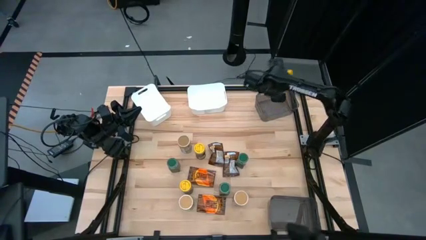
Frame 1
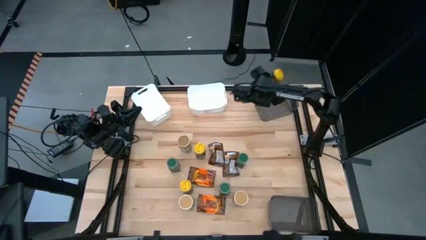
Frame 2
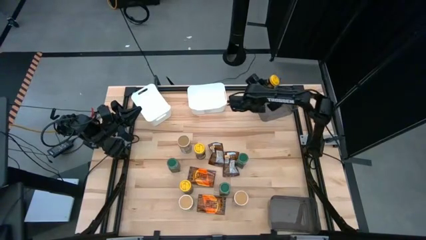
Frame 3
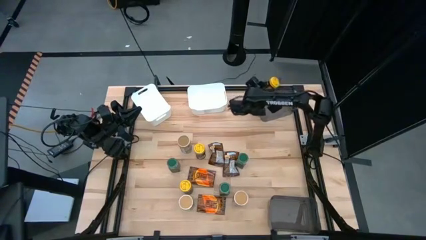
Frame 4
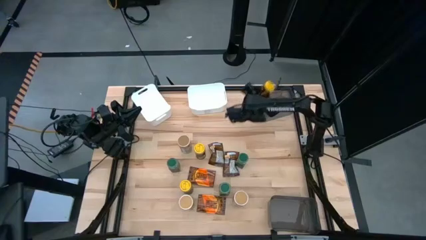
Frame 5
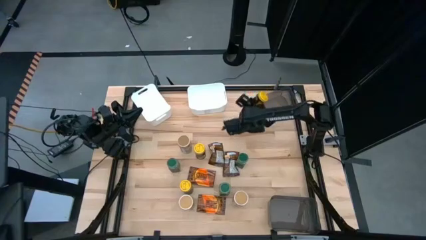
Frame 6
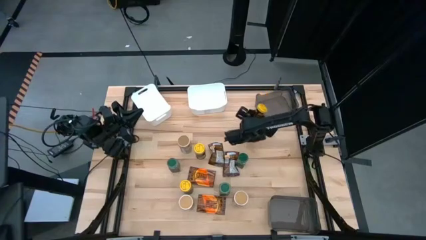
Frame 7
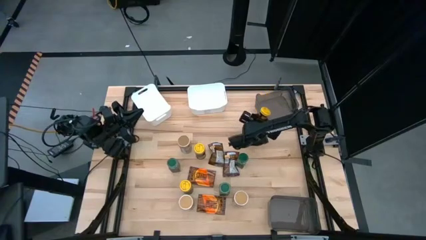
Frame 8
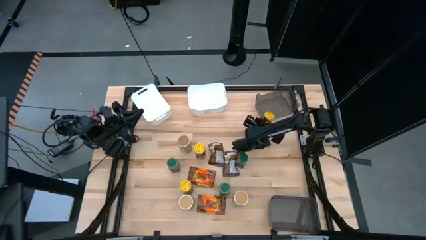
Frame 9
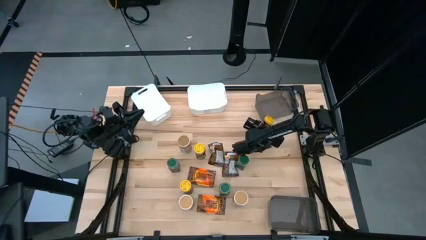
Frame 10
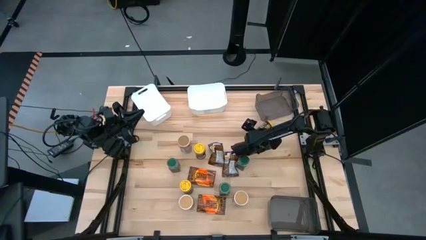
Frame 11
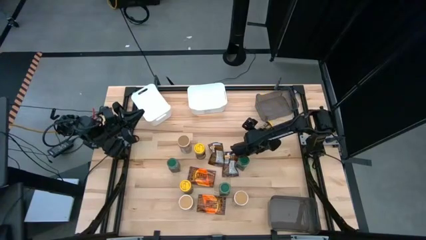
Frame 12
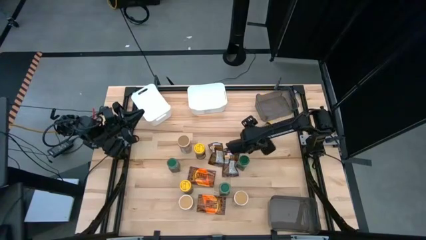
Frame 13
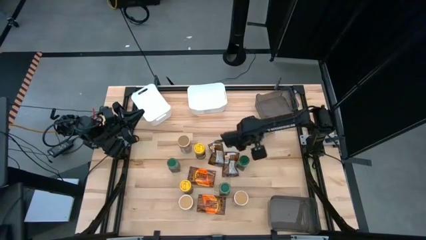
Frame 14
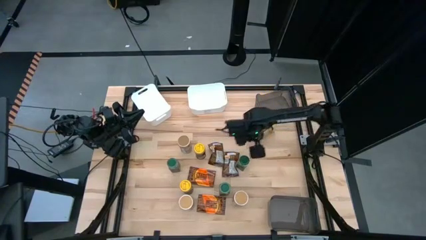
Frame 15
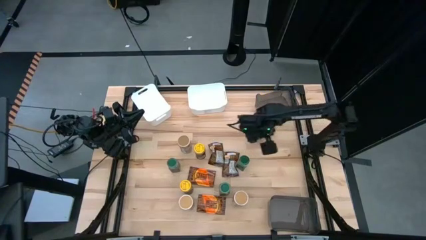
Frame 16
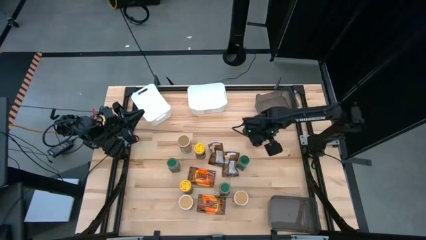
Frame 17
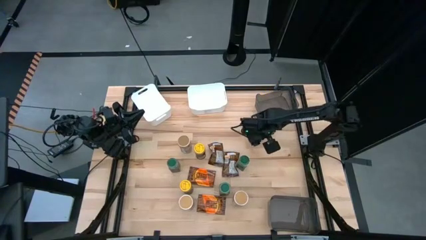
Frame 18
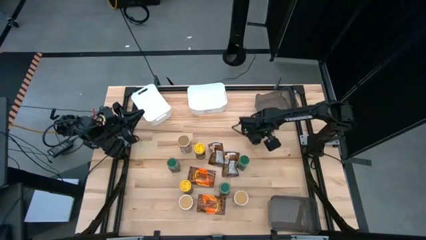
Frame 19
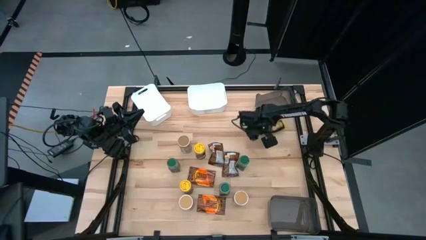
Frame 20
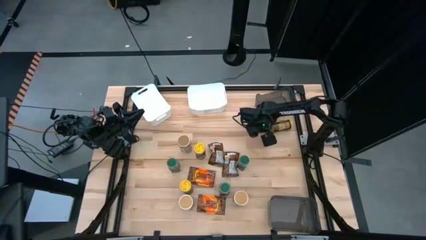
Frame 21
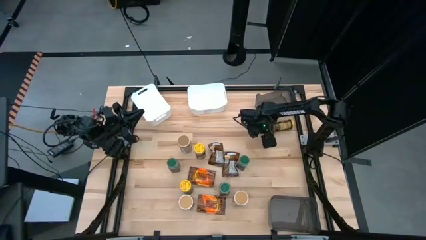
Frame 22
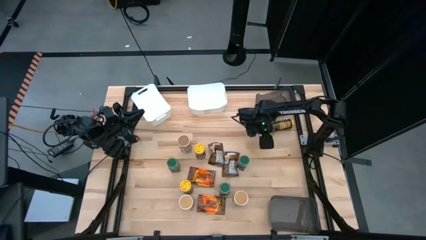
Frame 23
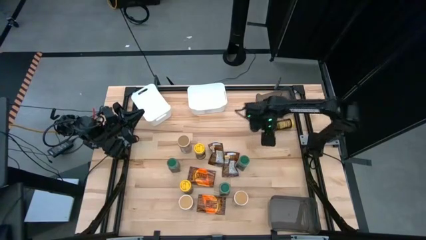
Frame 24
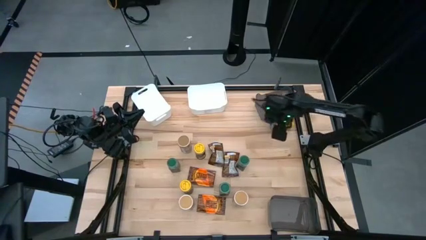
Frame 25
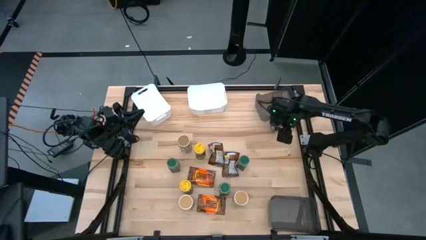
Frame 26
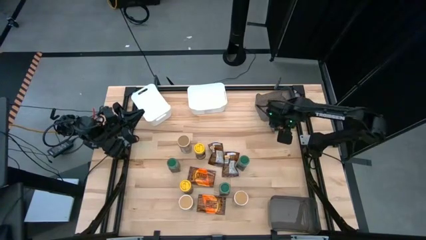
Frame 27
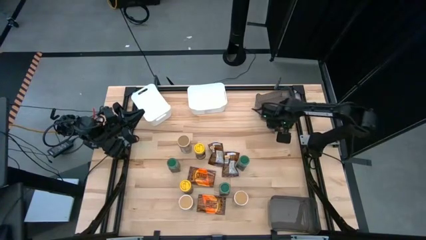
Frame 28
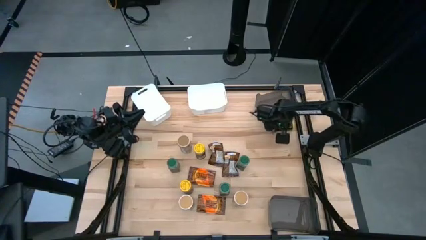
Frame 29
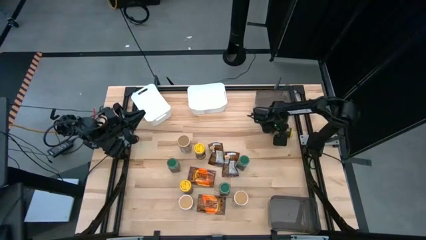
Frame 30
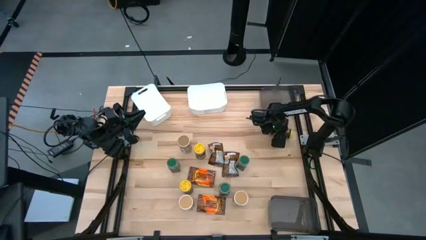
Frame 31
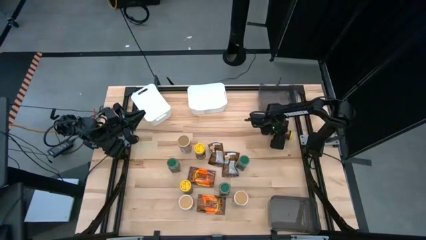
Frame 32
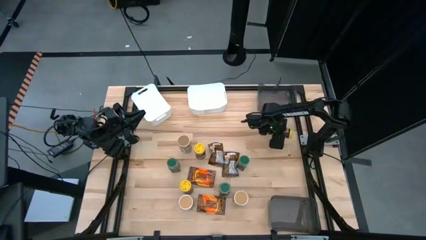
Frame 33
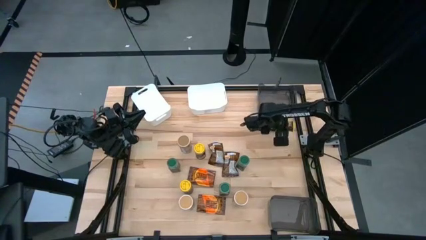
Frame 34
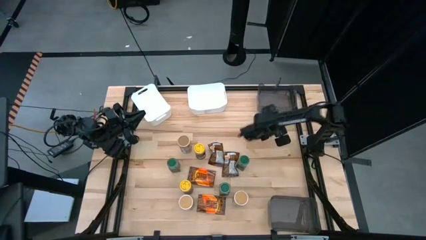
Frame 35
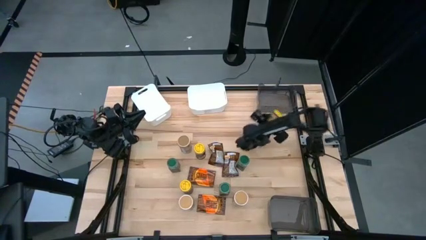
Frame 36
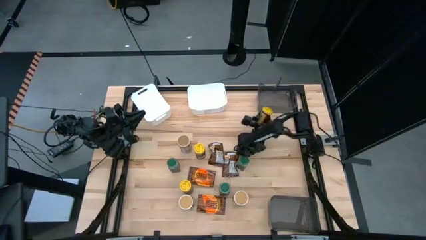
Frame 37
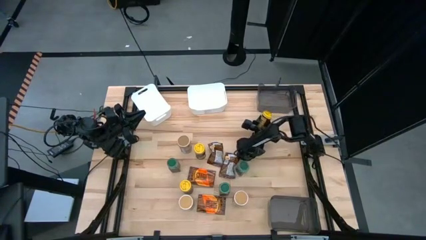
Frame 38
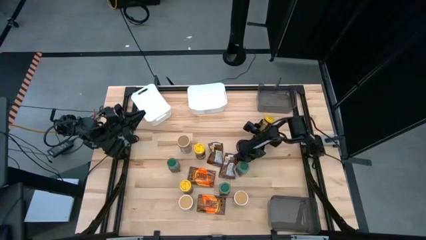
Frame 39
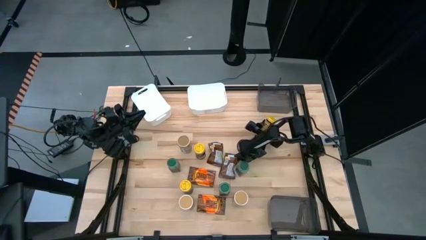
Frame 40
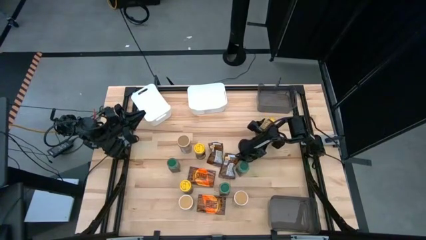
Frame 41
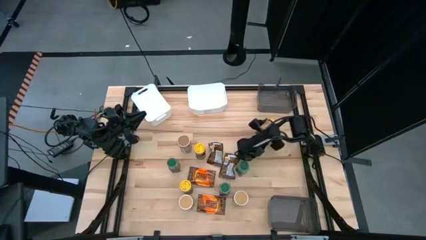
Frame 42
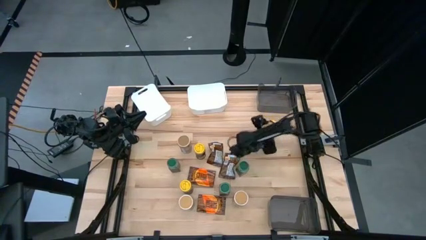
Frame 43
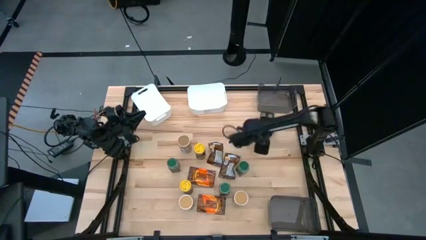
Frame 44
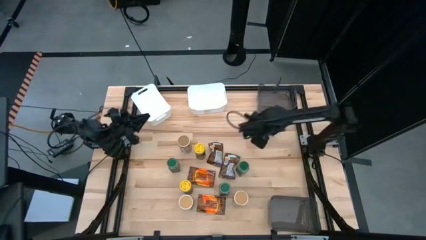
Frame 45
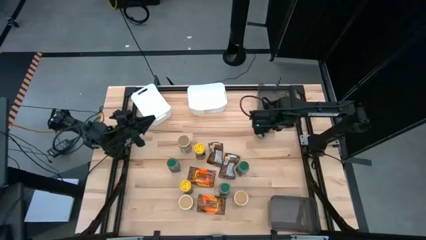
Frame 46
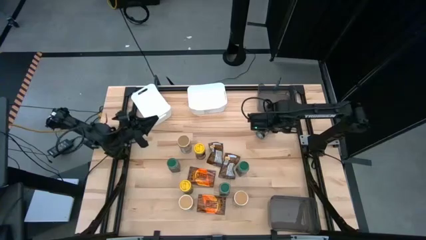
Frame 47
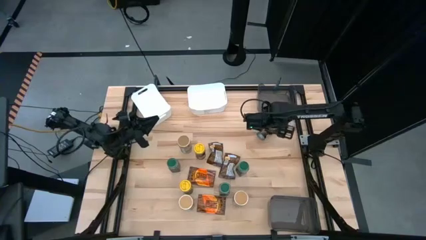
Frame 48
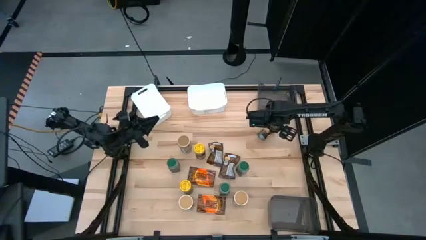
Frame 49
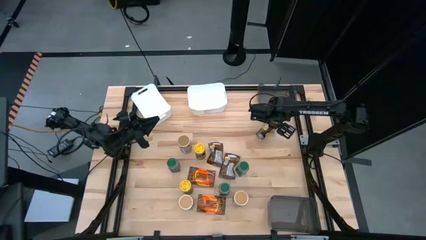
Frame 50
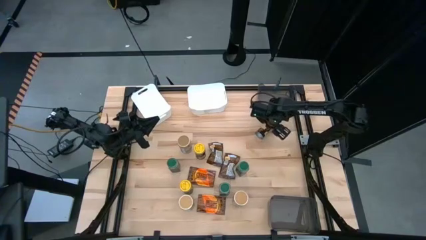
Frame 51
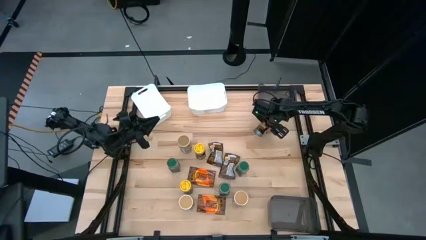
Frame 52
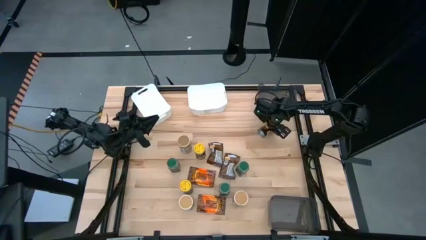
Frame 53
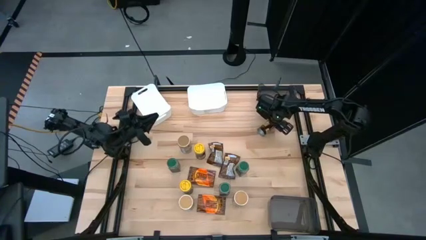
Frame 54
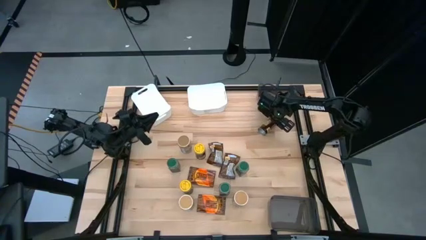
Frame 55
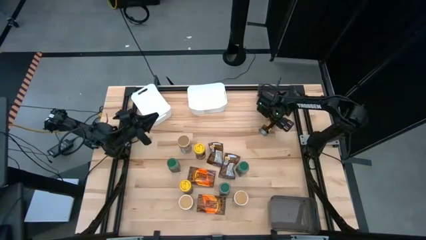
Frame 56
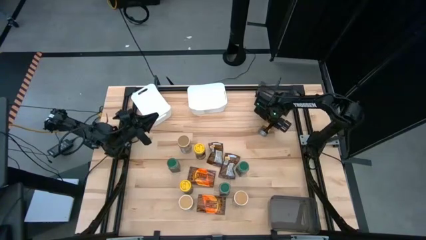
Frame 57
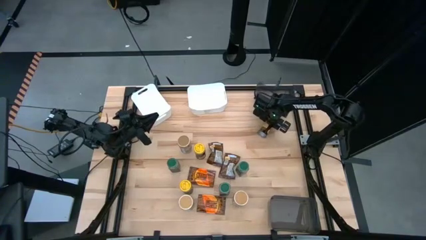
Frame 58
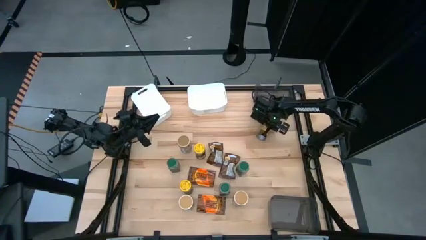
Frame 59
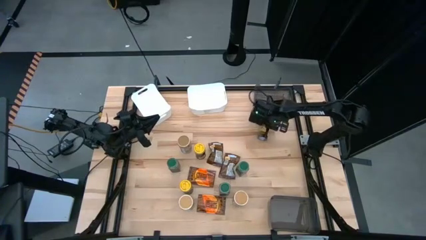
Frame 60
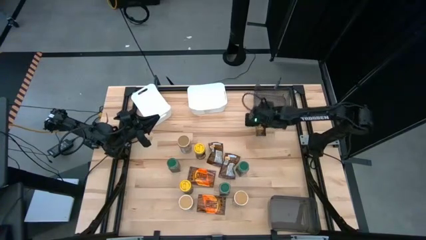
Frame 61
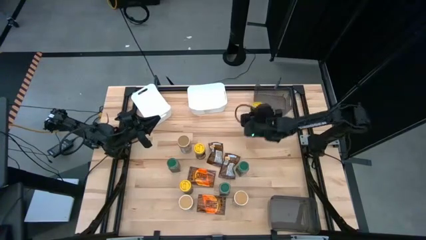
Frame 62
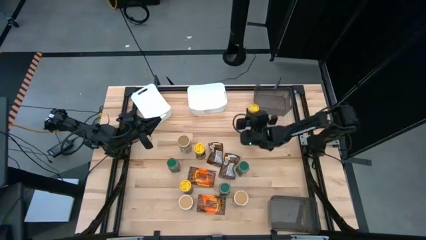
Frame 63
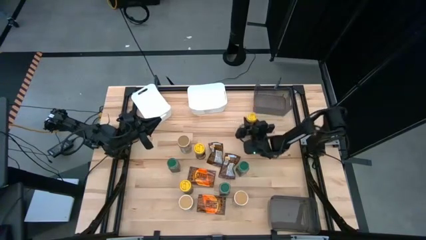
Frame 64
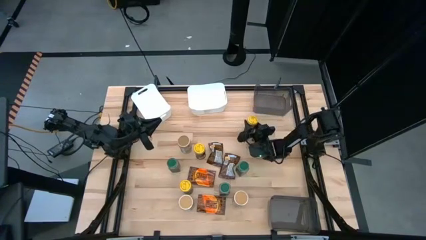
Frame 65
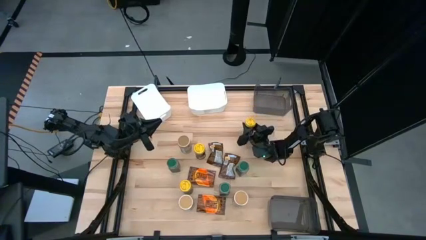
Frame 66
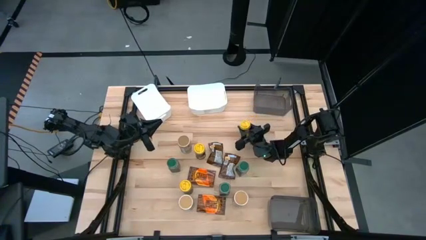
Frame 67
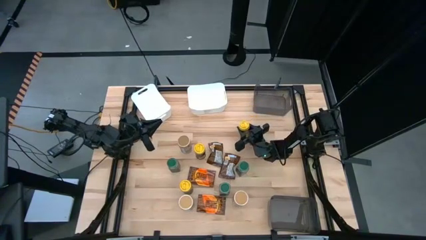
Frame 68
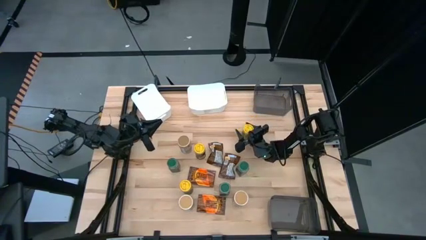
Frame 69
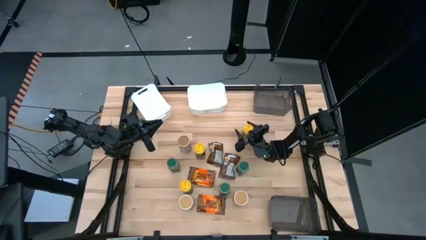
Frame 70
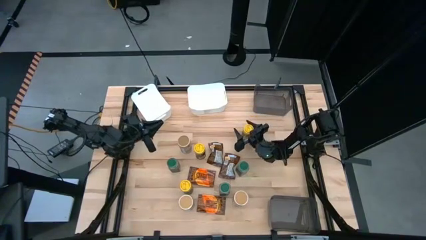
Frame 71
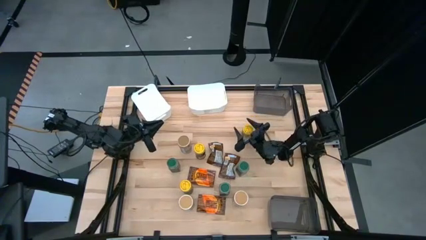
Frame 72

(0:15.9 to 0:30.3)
Task: Sort spices by type
Put the right yellow seasoning bottle into the top black bin
